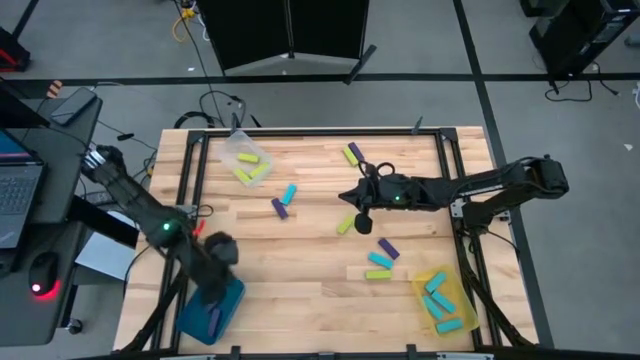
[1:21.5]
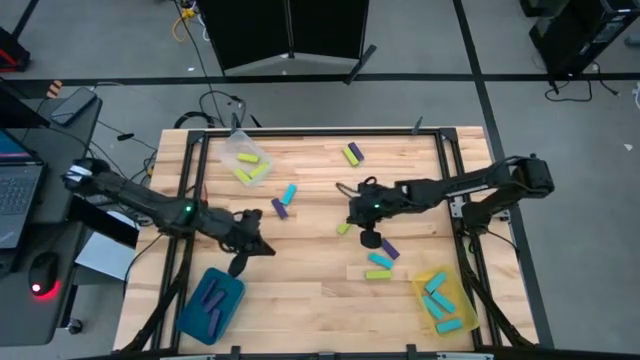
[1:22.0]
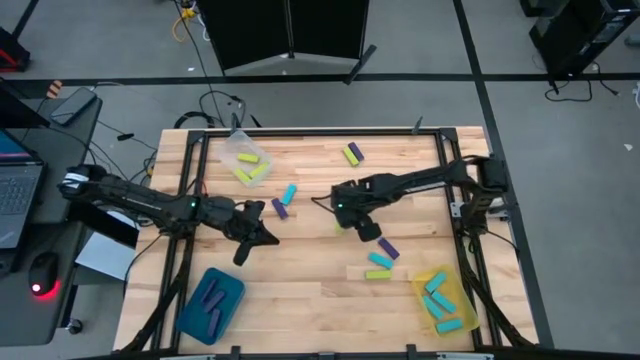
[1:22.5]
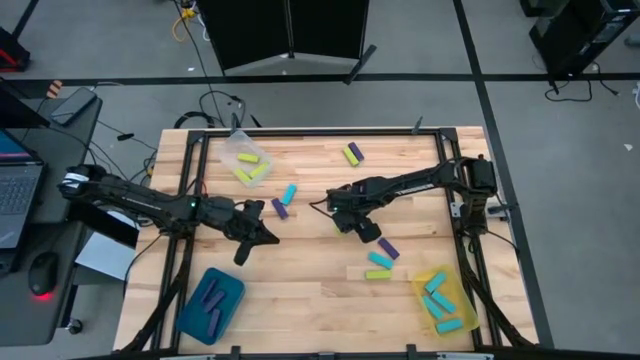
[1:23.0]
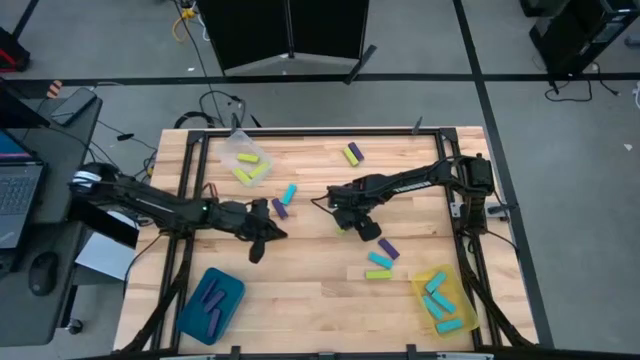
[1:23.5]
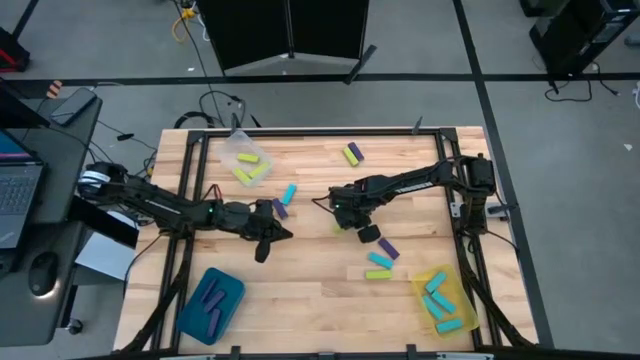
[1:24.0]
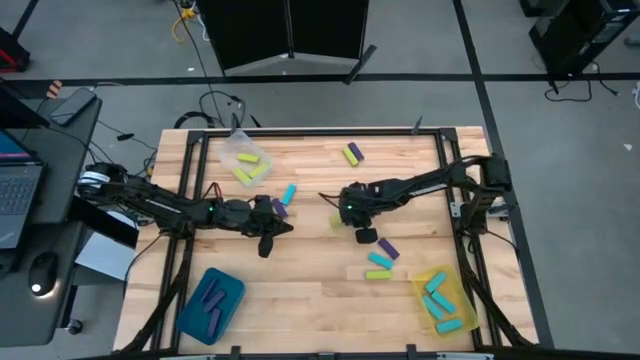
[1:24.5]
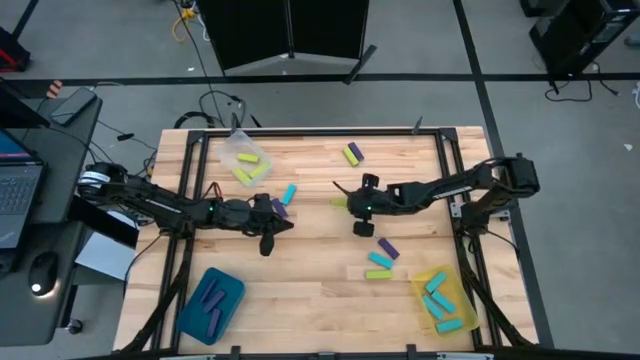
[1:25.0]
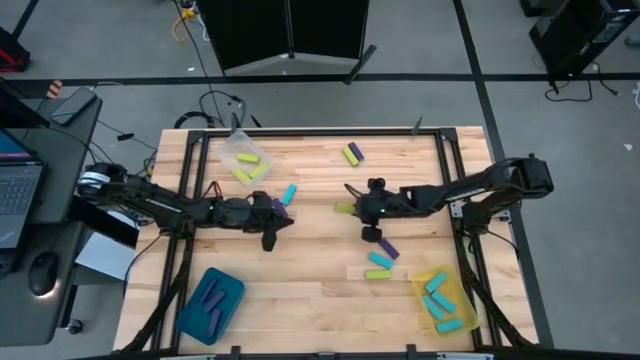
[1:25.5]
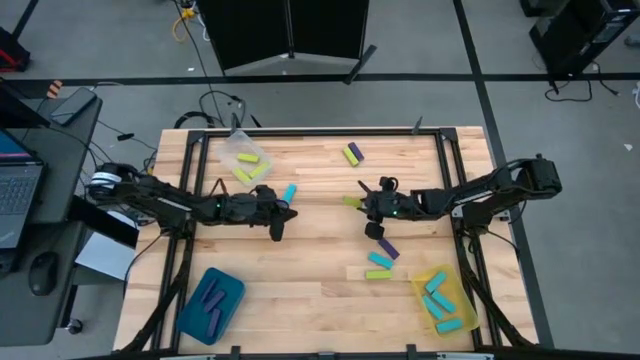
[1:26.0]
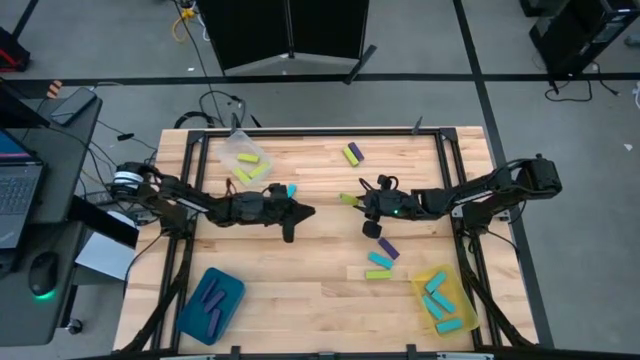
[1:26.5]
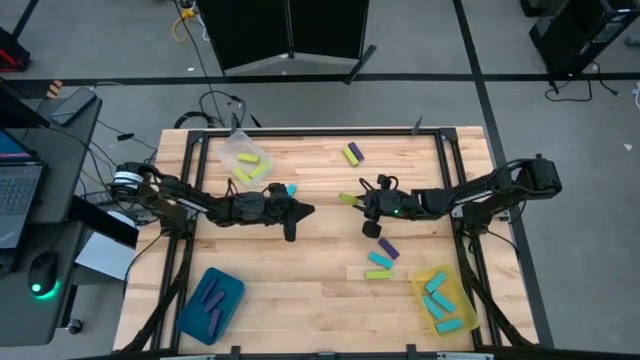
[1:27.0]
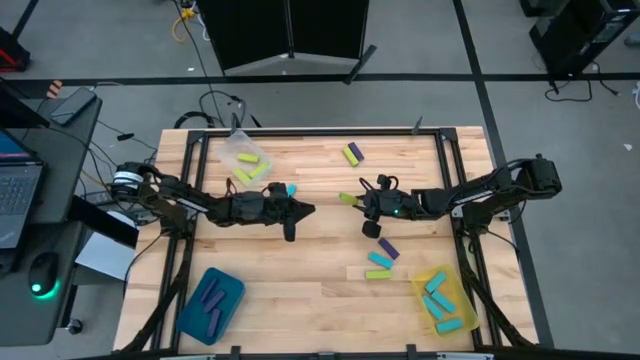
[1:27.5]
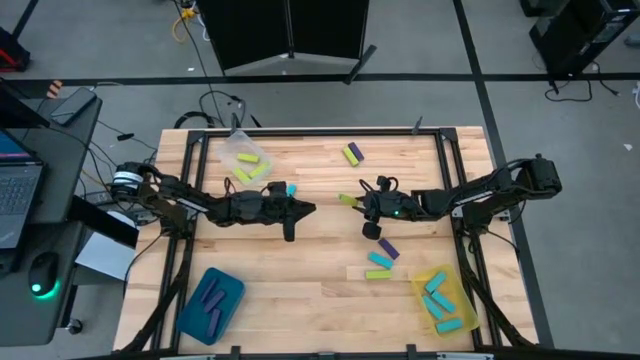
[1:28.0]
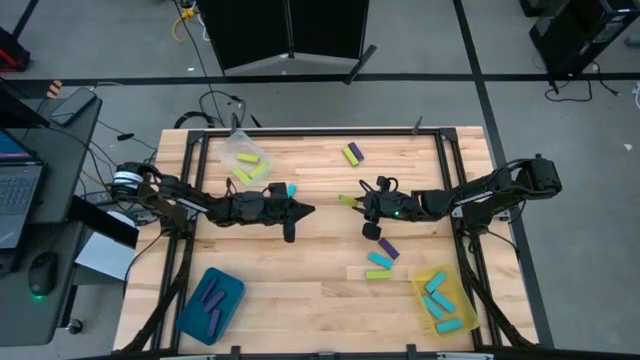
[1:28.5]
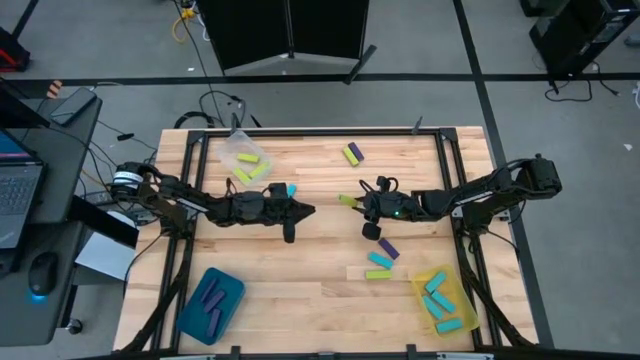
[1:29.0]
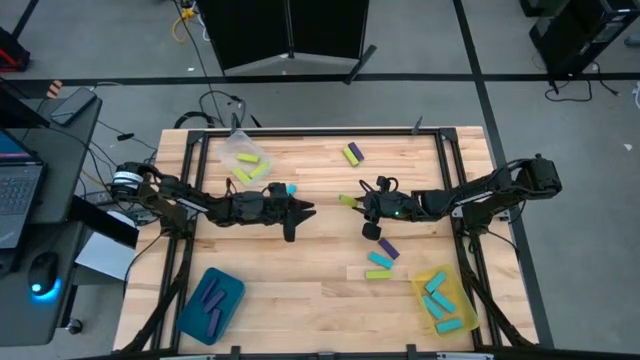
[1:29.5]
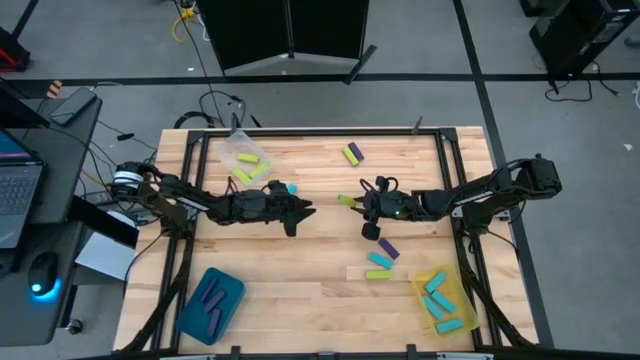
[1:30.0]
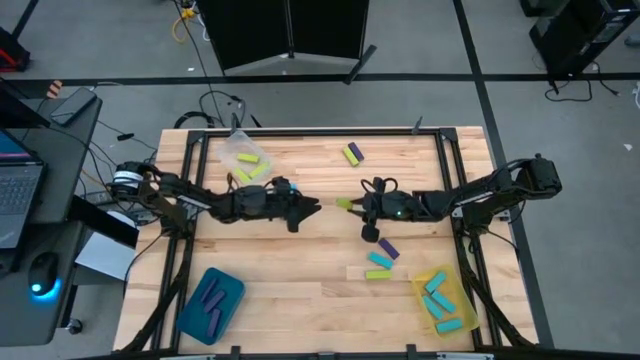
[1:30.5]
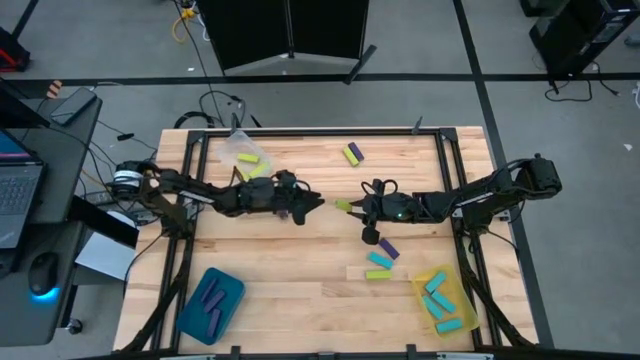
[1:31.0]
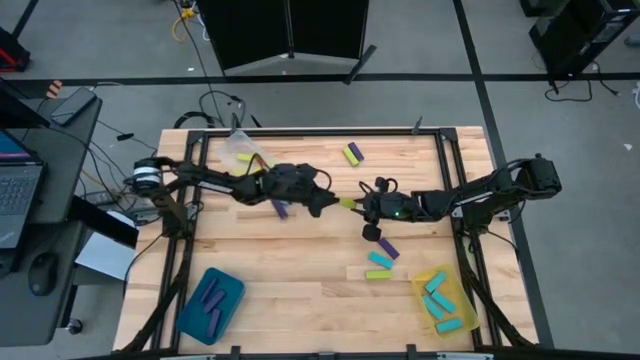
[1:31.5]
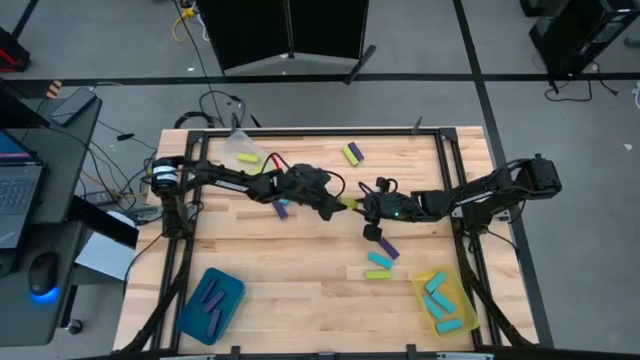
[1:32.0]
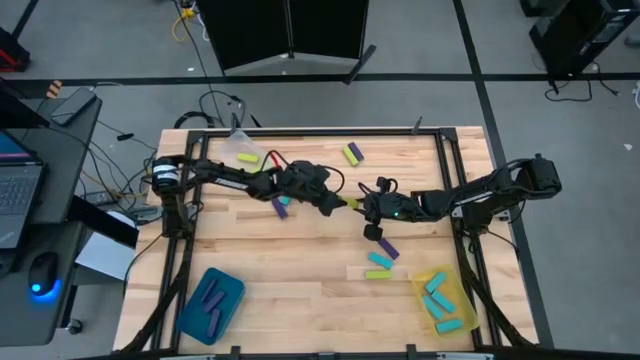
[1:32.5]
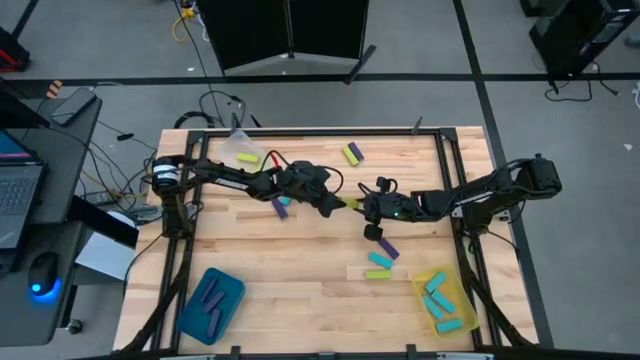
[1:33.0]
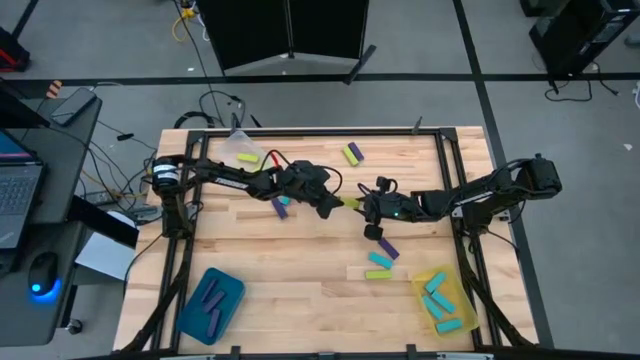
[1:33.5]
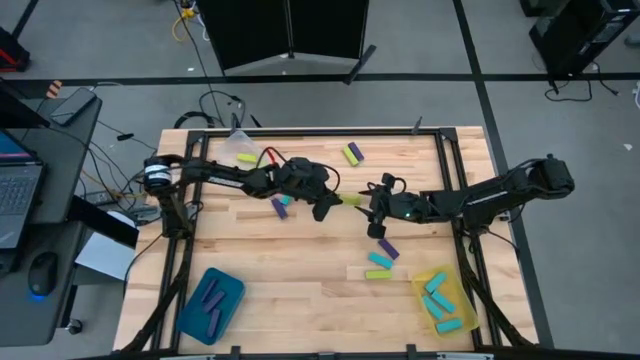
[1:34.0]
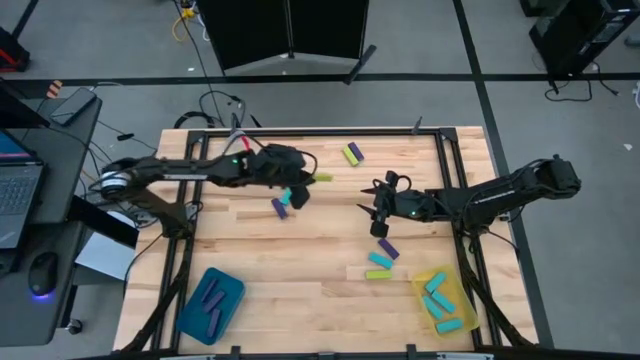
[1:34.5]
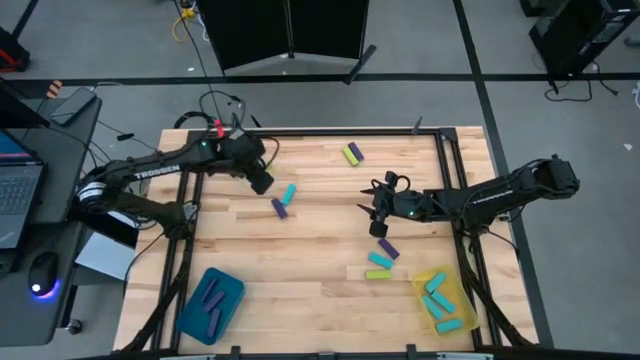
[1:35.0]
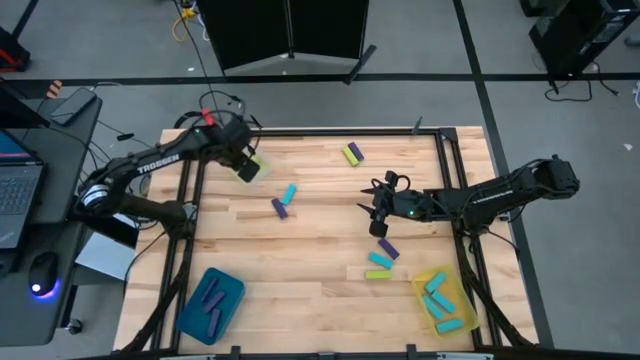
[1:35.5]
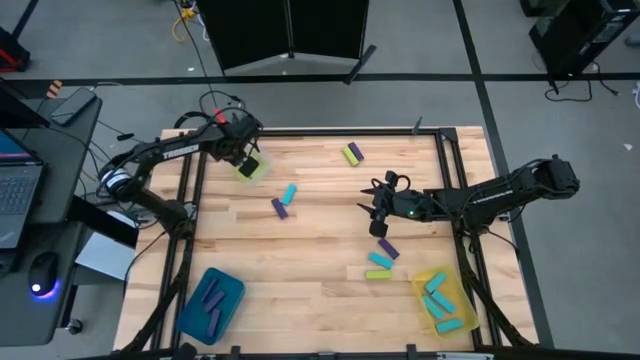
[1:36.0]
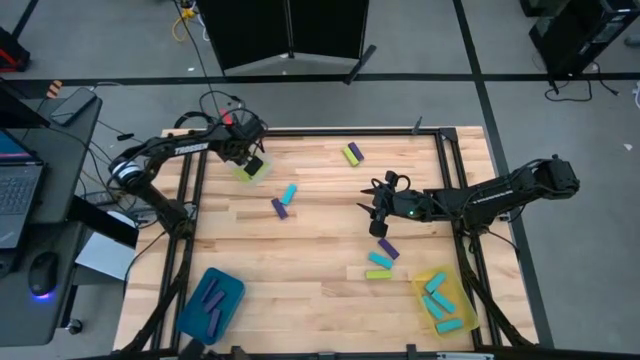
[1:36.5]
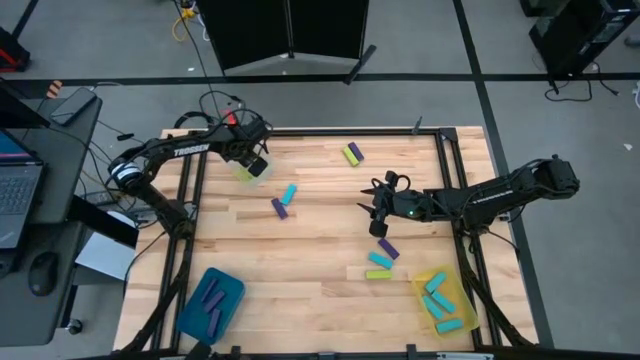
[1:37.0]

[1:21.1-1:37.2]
Task: Sort blocks
Put the green block into the transparent bin

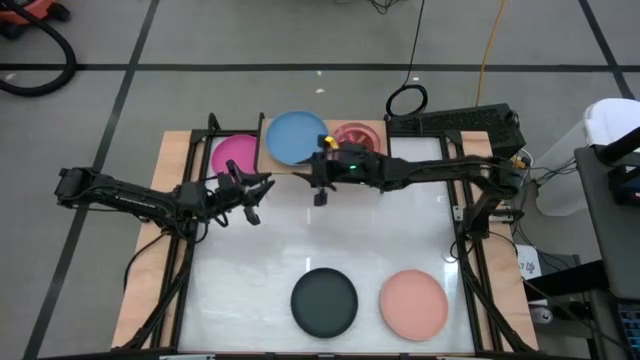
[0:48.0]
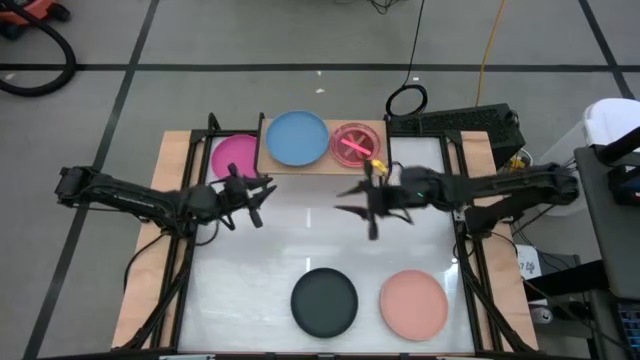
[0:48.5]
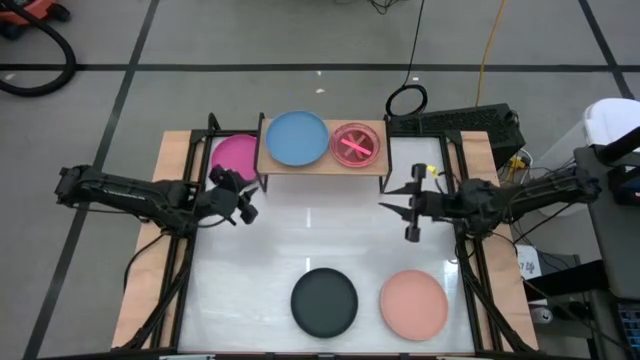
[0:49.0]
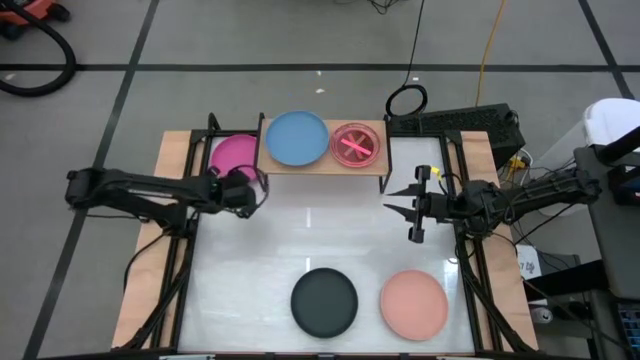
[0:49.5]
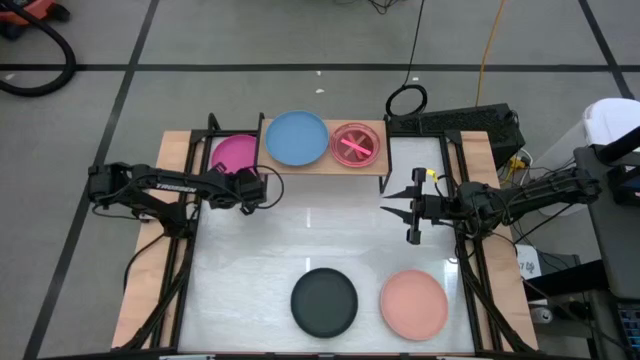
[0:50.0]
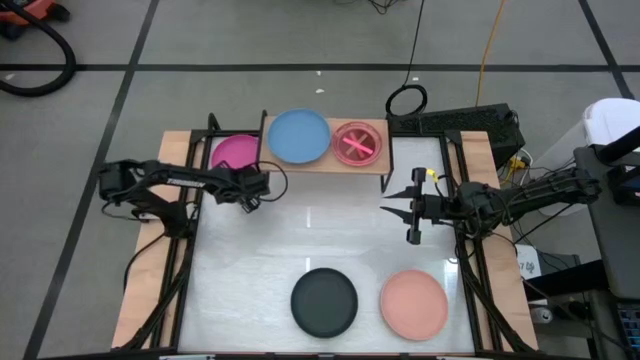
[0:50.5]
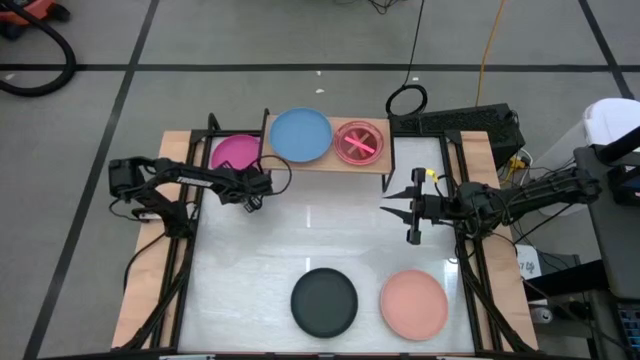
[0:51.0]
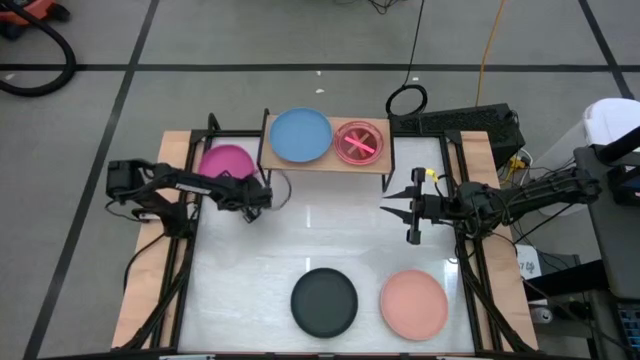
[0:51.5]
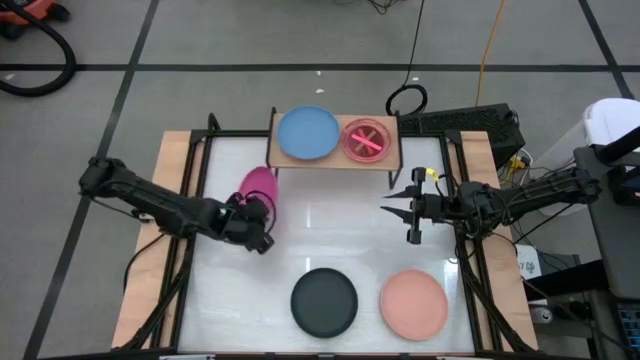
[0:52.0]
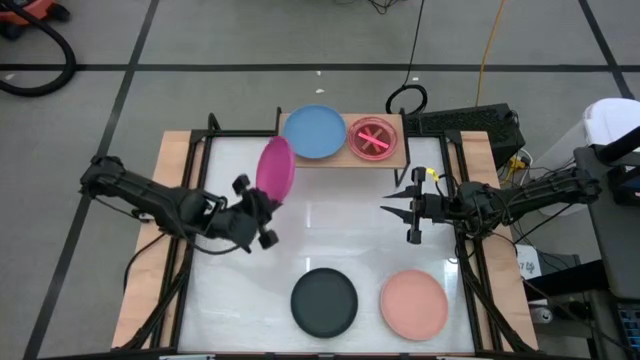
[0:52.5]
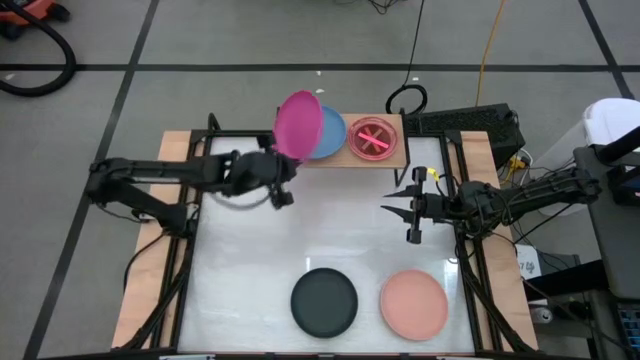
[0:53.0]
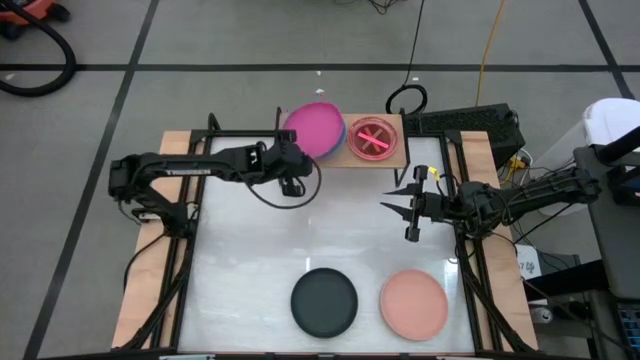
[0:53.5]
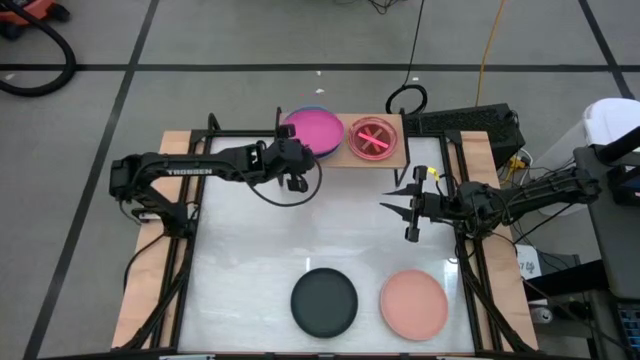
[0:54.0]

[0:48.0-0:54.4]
Task: Place and stack plates onto a shelf
Stack the pink plate on top of the blue plate on the shelf
